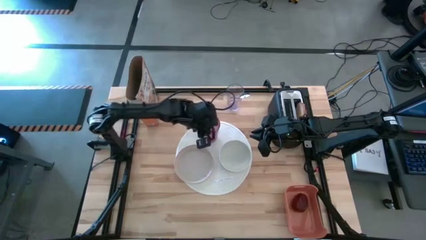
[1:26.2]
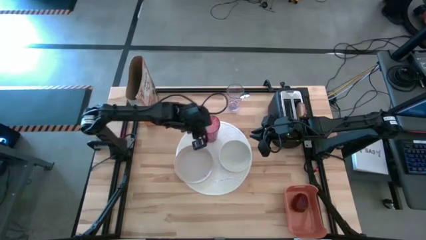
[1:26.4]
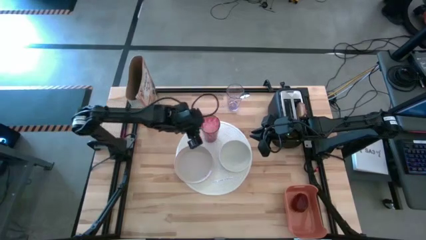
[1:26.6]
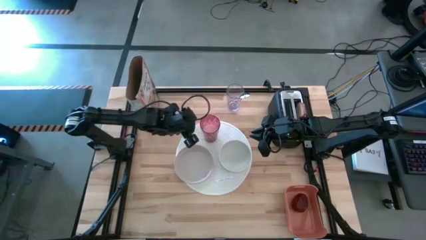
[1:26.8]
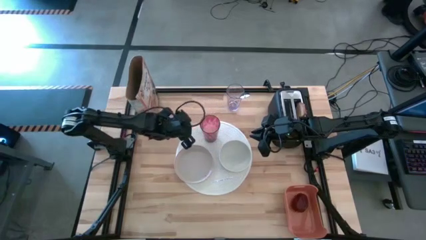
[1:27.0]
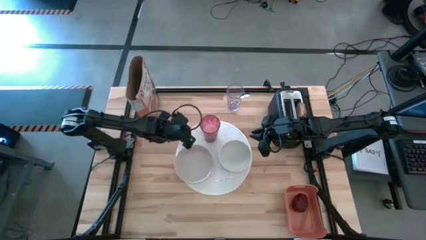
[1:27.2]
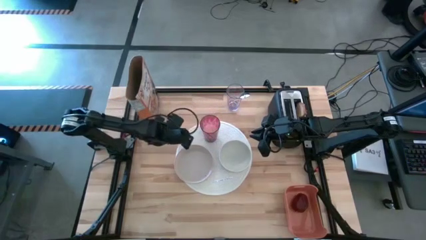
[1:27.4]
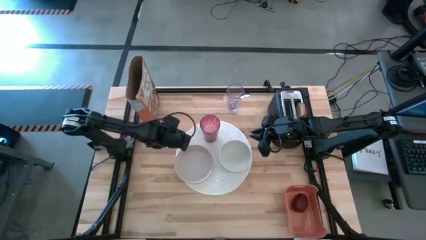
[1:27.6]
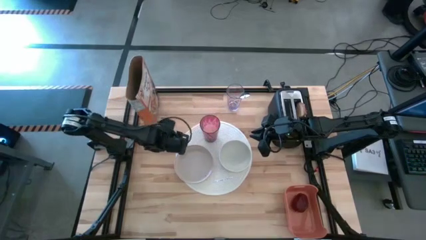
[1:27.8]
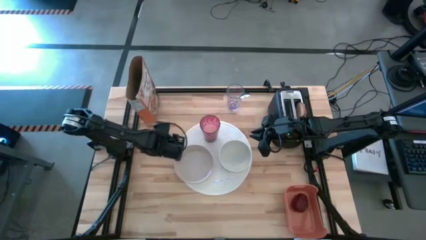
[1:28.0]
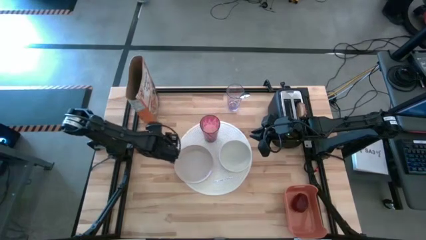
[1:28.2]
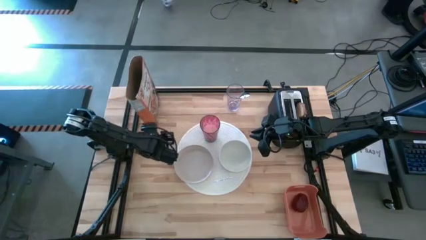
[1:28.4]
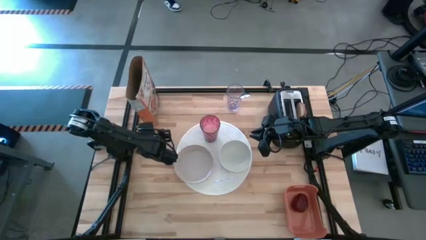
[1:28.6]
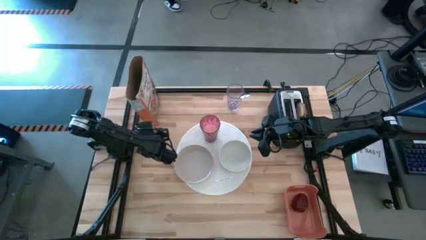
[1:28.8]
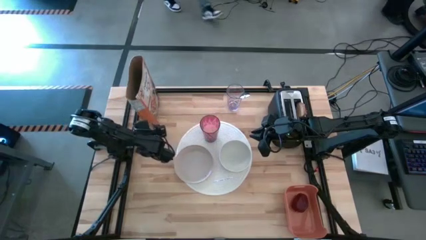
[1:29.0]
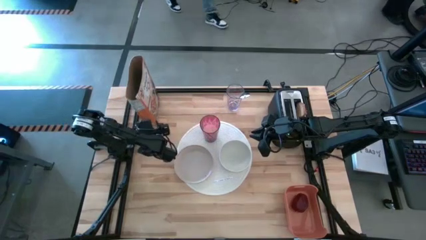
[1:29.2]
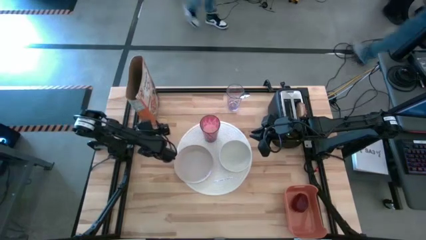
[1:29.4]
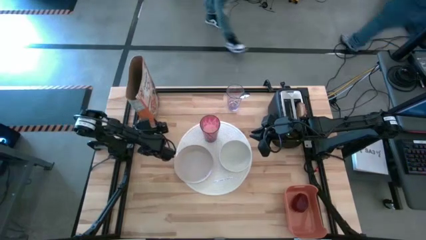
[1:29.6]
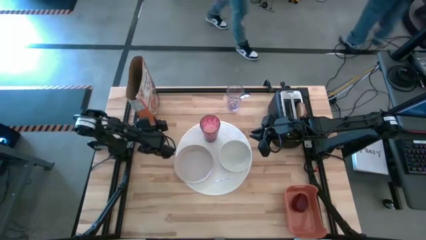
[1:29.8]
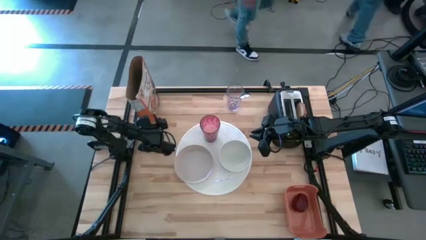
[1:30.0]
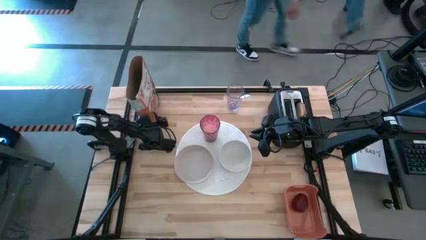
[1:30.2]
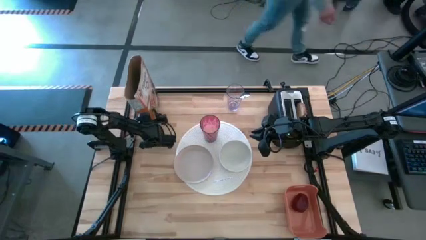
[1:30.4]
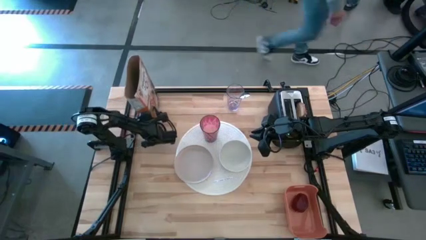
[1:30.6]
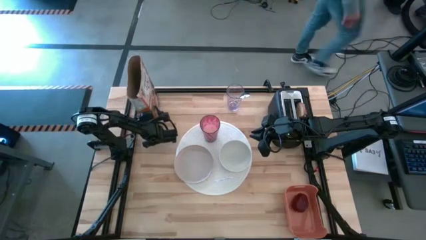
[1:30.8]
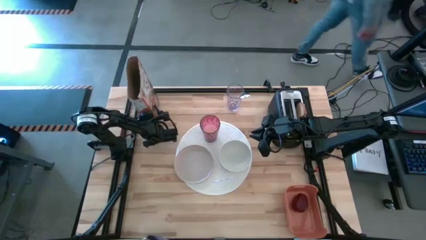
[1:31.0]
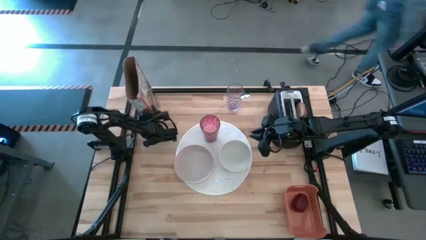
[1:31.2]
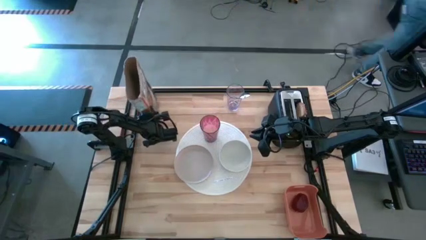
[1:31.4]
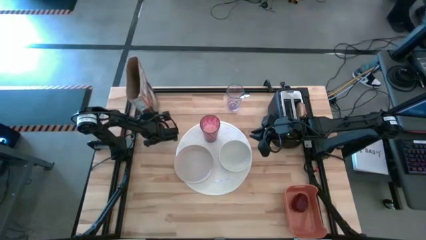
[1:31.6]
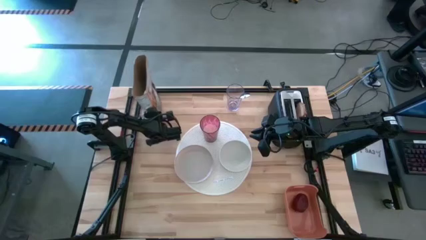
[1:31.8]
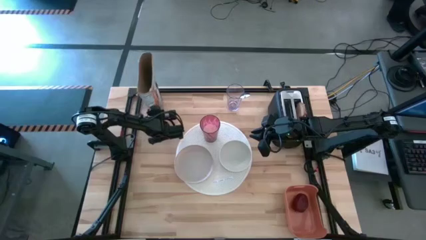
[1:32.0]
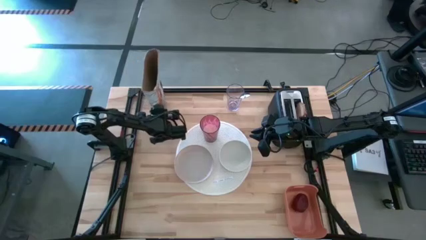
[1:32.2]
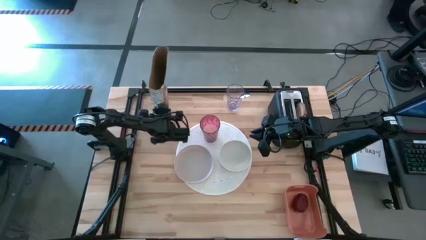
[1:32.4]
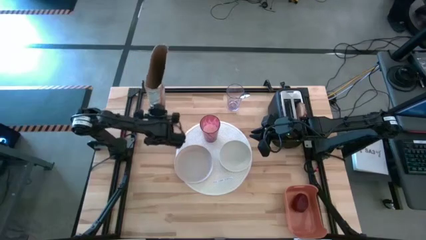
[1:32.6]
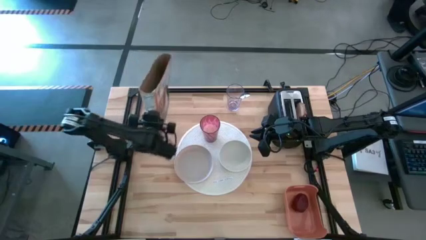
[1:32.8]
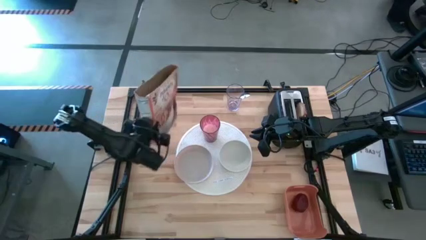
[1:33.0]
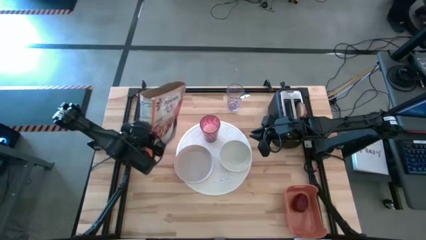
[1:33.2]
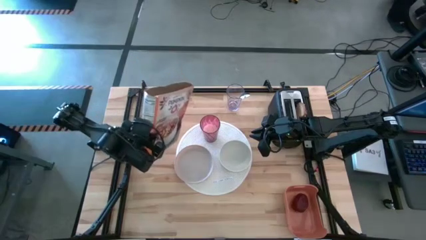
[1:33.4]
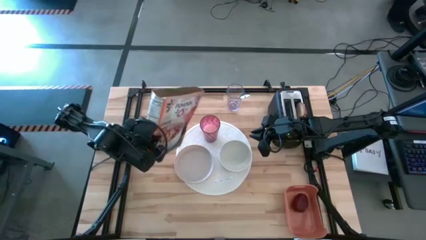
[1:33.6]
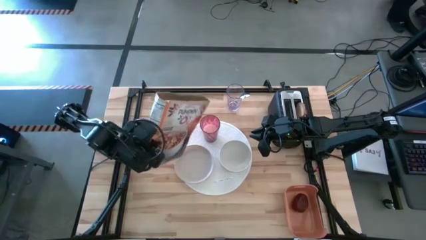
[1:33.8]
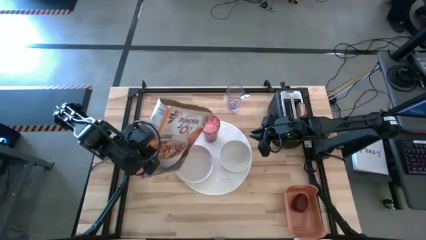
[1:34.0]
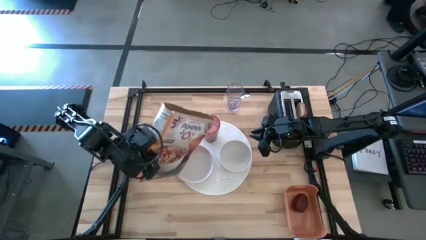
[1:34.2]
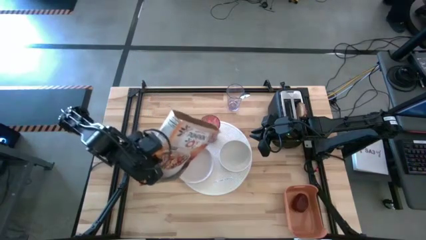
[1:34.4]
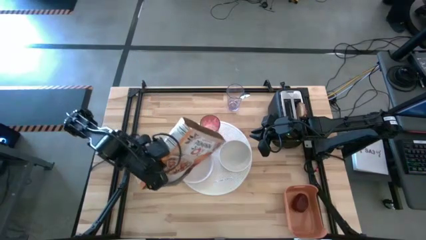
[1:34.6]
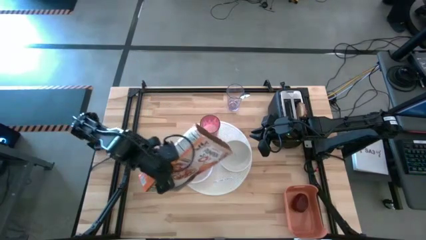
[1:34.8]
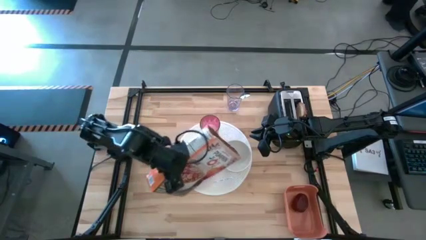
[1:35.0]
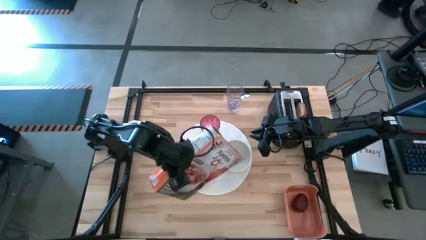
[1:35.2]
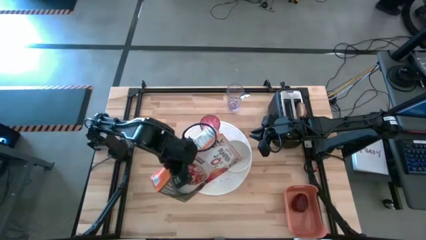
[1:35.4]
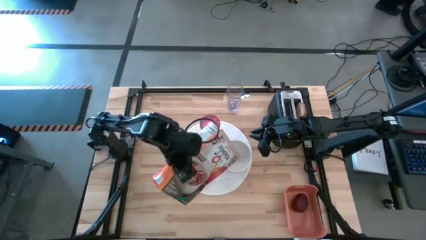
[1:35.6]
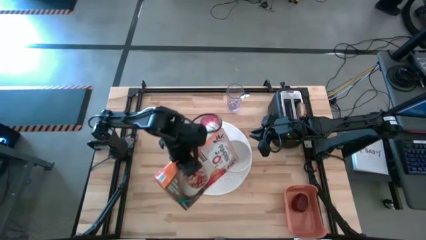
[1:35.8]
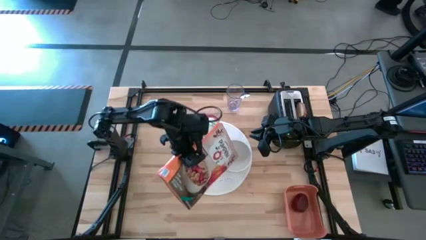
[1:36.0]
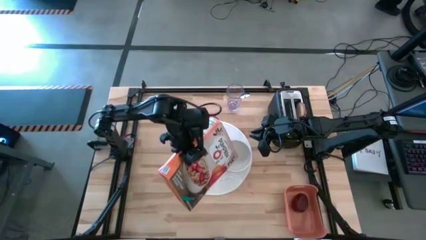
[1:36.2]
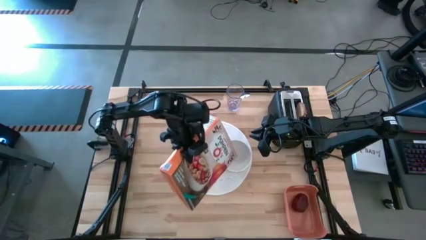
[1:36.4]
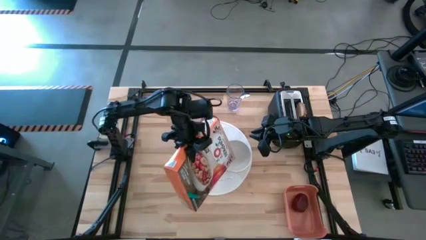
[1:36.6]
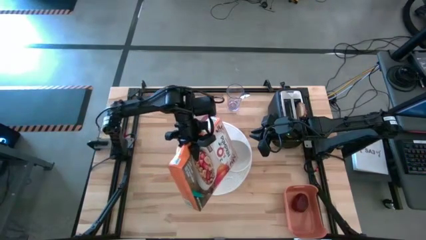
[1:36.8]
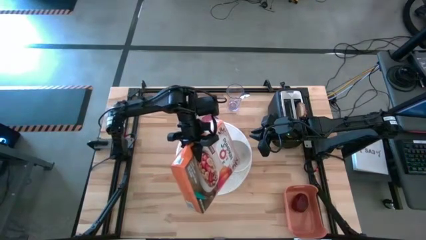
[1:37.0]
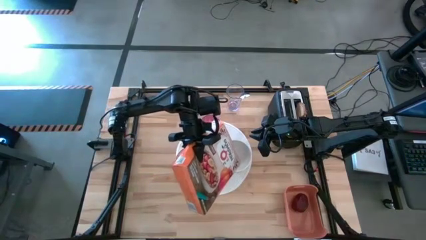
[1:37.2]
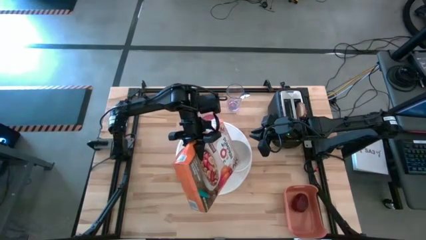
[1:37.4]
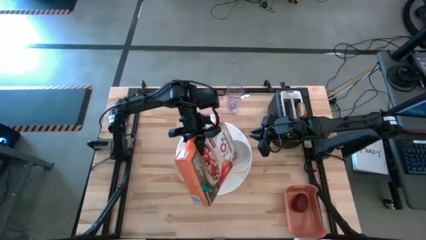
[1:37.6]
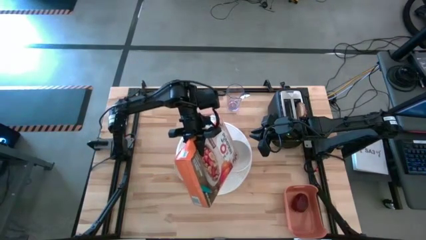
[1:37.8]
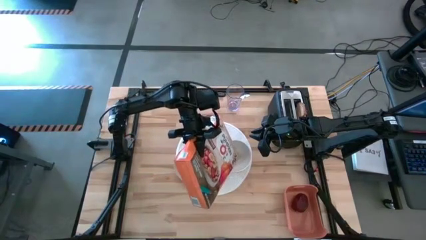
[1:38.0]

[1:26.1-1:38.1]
Task: Arrange a breakfast setting
Pour the cereal from the cereal box into the white bowl

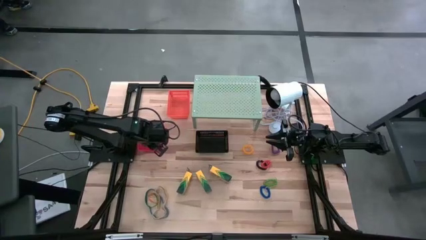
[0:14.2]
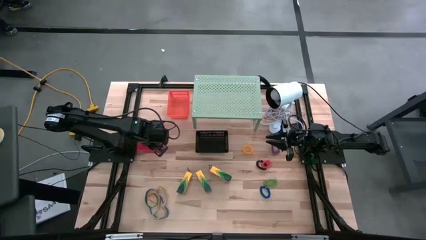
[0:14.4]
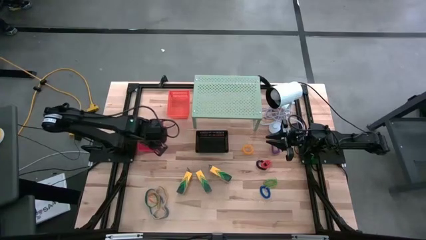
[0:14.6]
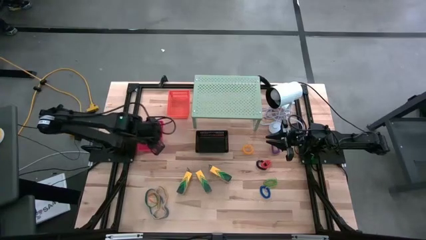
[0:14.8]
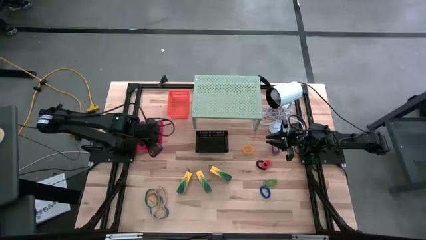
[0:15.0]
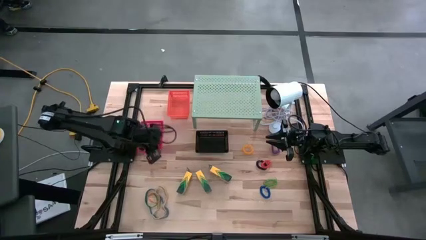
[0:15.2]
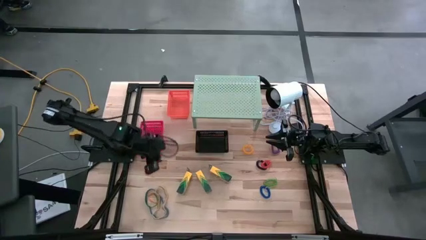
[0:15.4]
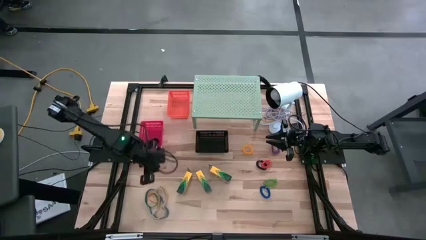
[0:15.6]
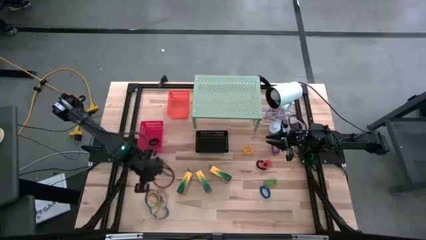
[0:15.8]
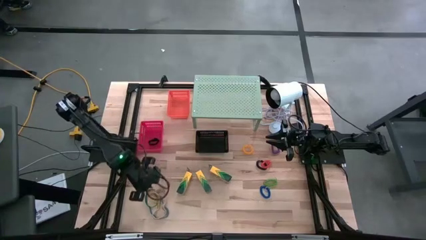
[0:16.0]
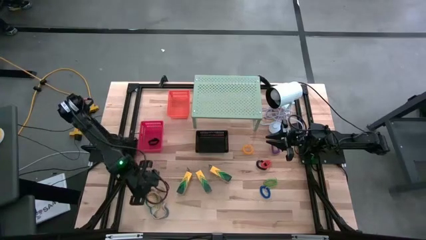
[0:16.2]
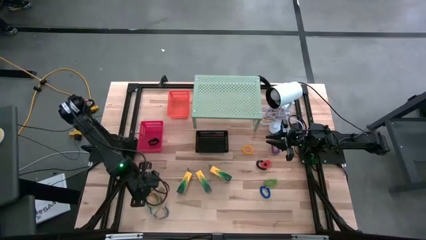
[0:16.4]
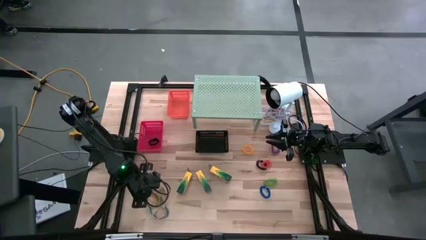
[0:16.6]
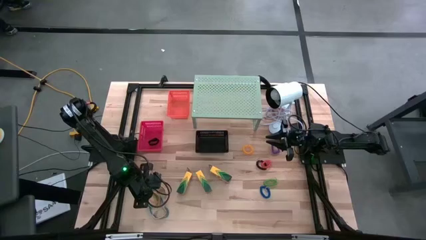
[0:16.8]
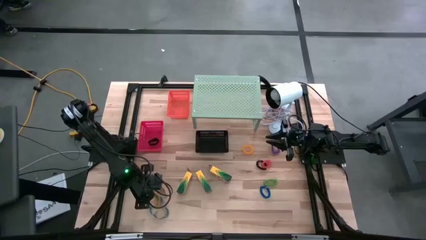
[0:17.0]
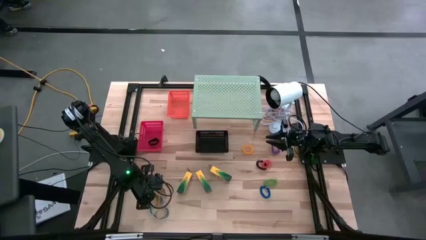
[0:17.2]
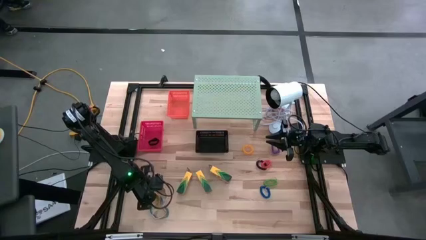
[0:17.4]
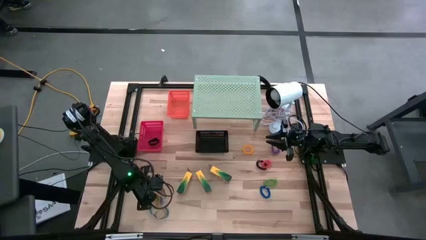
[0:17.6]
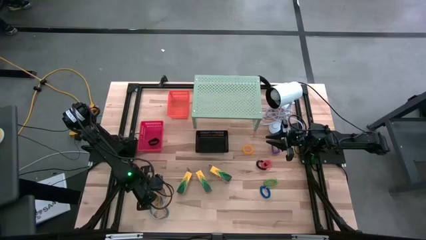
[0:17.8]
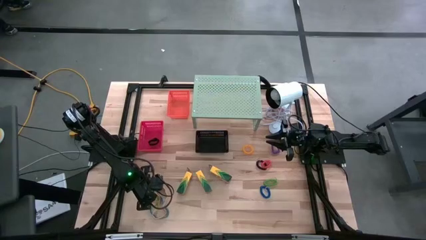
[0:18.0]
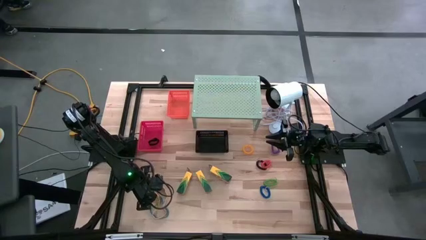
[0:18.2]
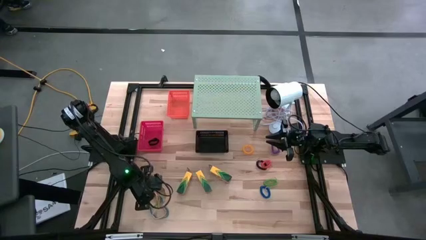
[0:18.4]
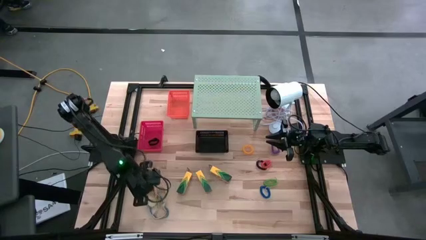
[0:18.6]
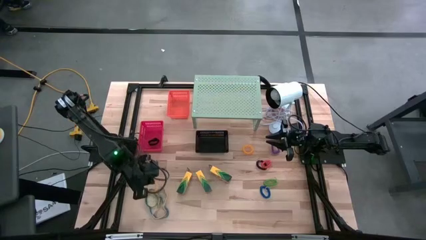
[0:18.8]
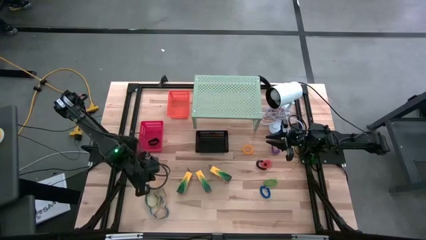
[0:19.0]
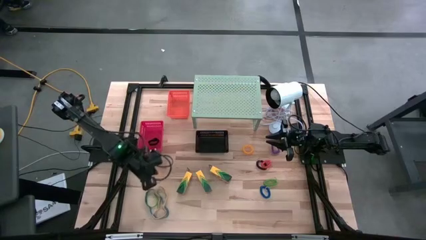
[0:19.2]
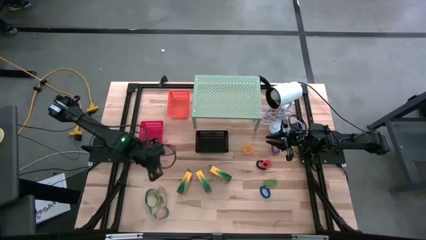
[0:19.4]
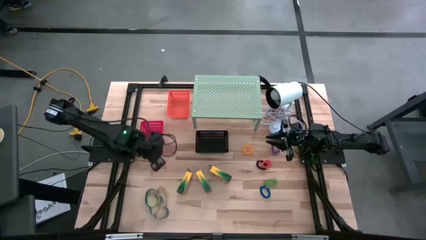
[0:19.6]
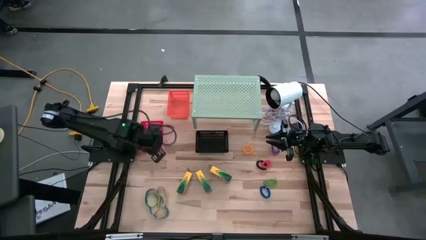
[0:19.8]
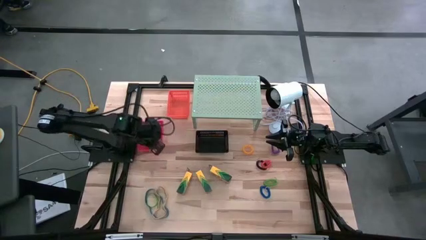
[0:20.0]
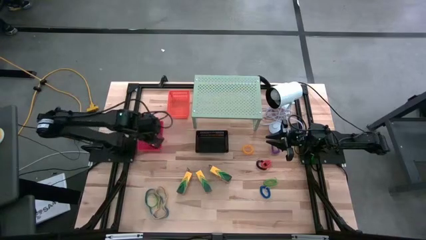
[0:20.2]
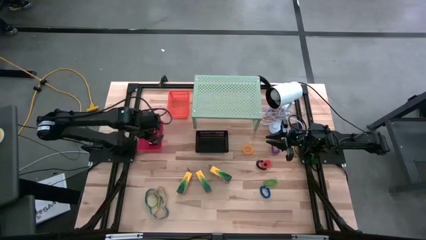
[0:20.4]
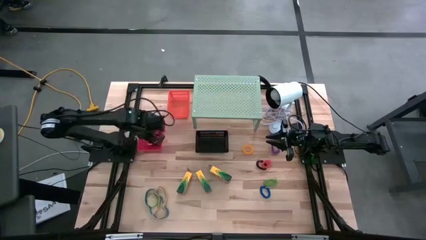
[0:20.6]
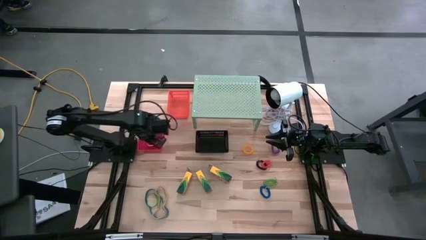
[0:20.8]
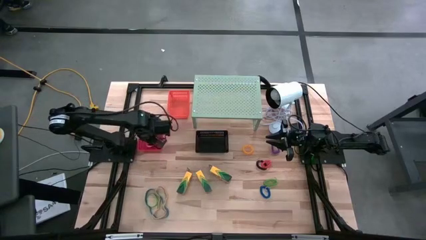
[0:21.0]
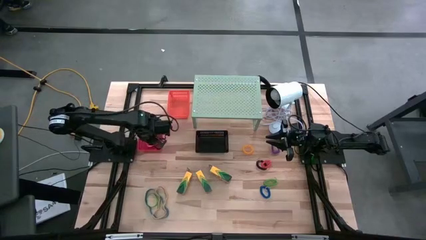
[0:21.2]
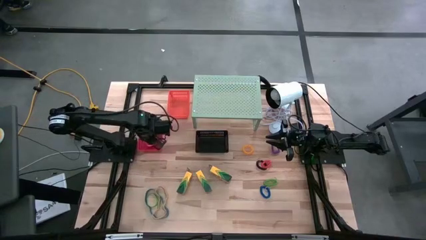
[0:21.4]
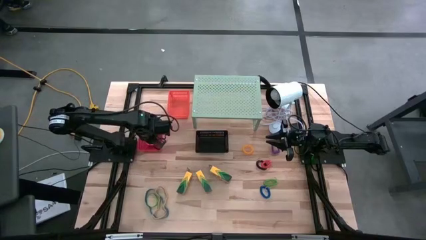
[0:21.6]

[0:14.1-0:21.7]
Task: Pick & Place Office Desk Supplies
Put the yellow rubber band into the orange bin on the shelf
